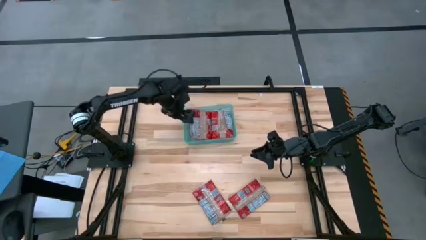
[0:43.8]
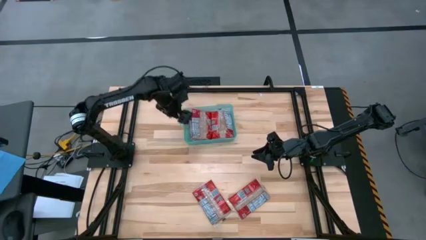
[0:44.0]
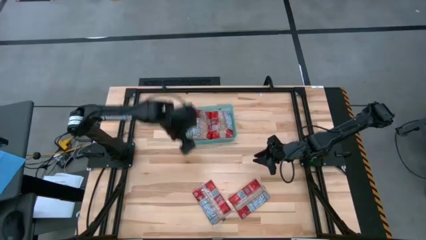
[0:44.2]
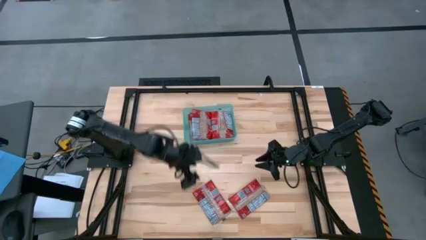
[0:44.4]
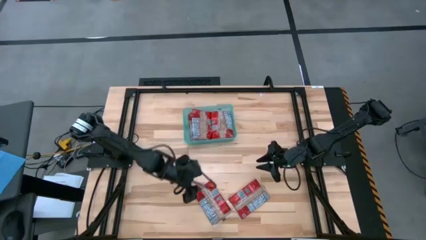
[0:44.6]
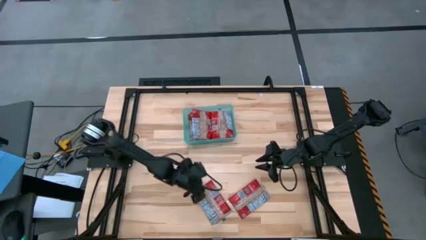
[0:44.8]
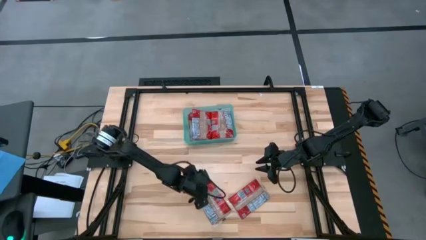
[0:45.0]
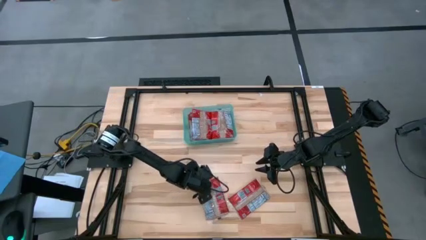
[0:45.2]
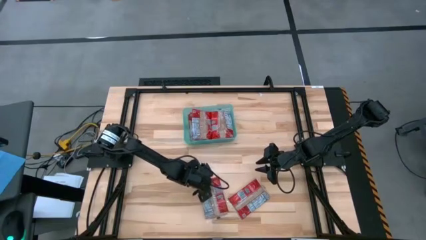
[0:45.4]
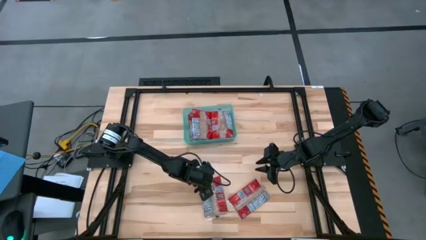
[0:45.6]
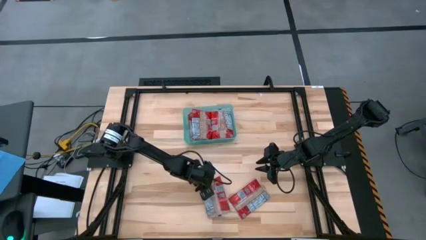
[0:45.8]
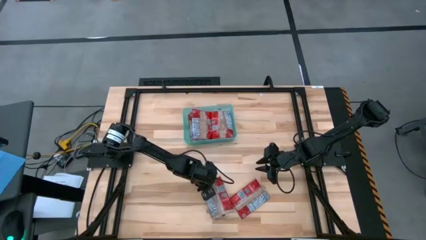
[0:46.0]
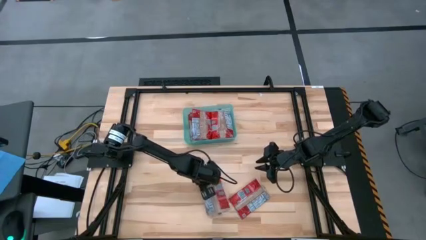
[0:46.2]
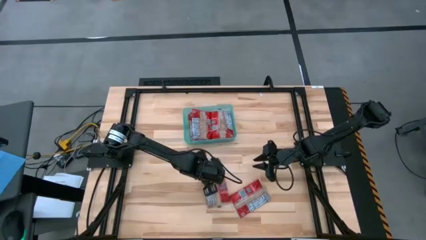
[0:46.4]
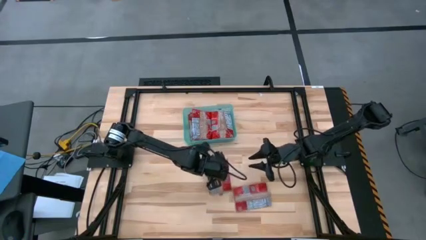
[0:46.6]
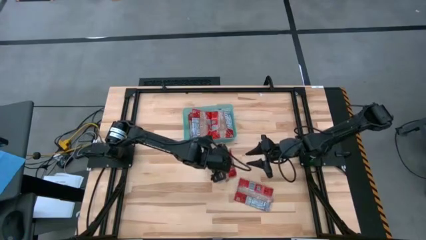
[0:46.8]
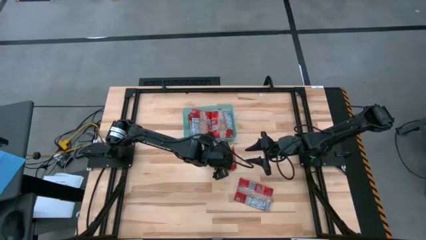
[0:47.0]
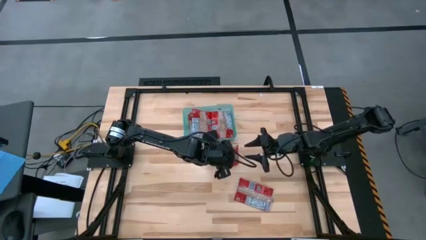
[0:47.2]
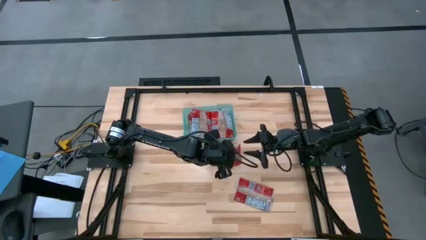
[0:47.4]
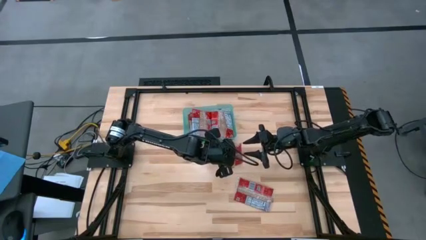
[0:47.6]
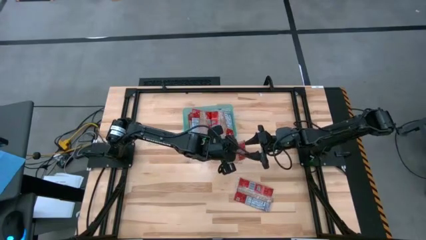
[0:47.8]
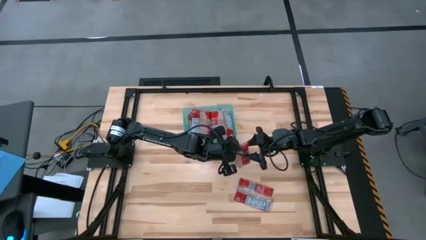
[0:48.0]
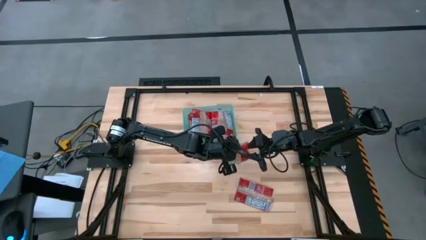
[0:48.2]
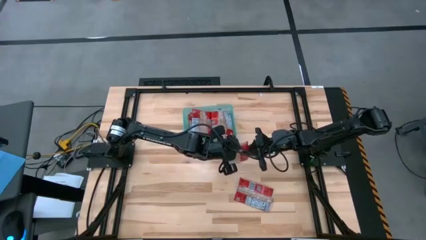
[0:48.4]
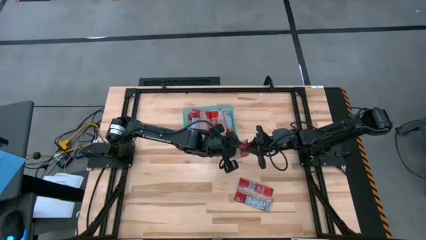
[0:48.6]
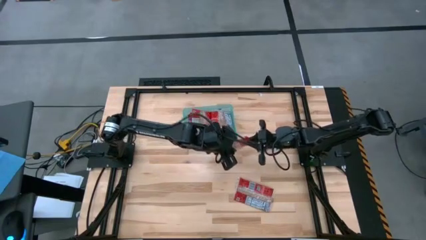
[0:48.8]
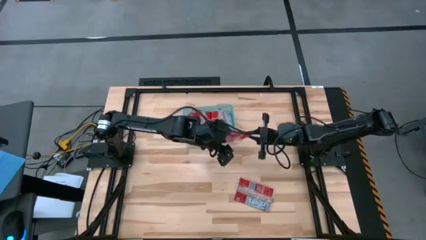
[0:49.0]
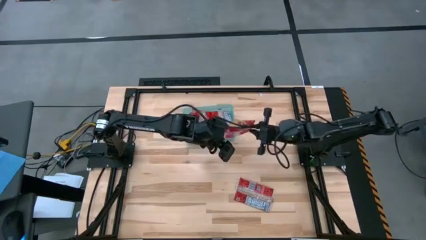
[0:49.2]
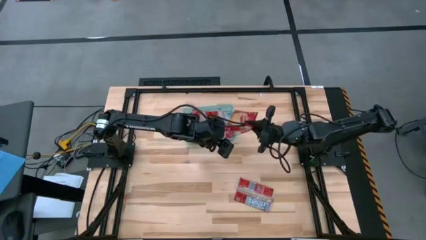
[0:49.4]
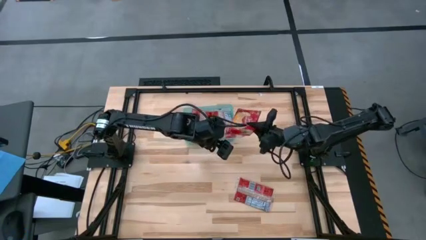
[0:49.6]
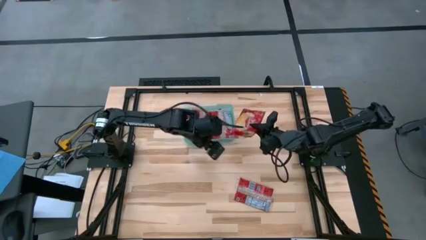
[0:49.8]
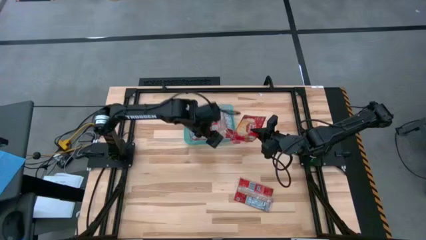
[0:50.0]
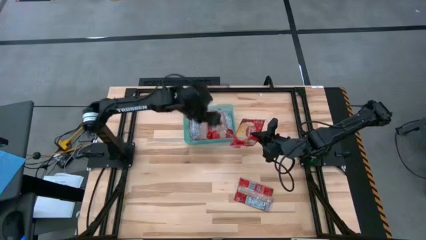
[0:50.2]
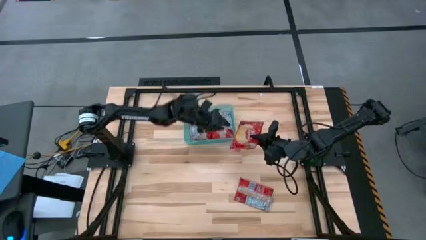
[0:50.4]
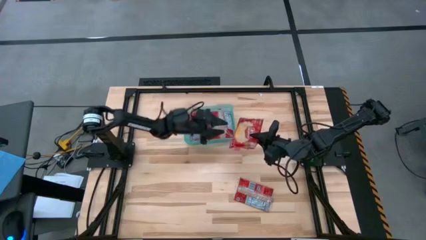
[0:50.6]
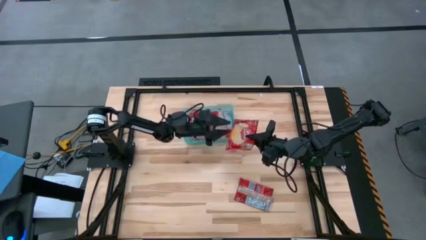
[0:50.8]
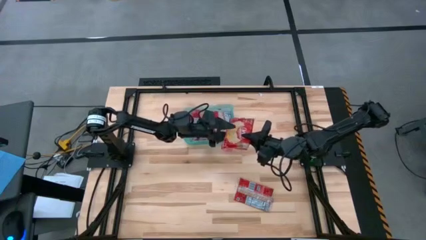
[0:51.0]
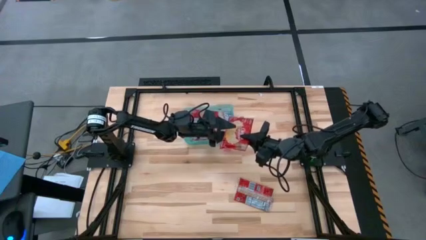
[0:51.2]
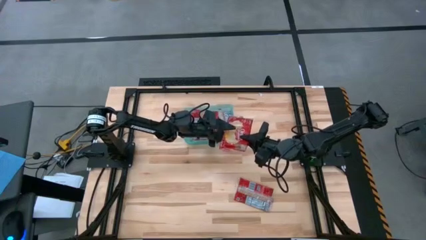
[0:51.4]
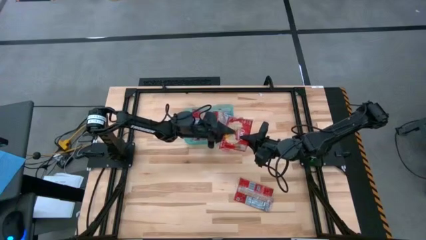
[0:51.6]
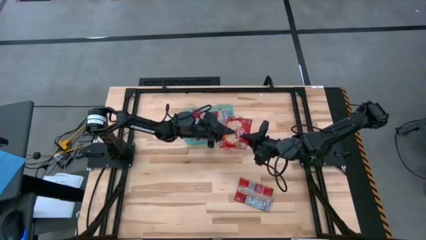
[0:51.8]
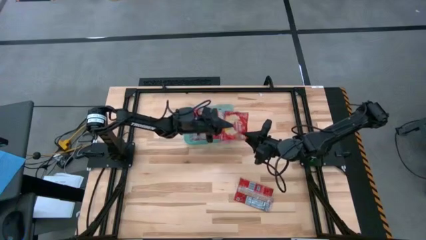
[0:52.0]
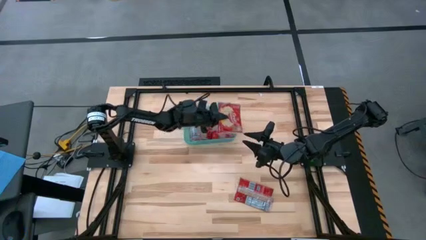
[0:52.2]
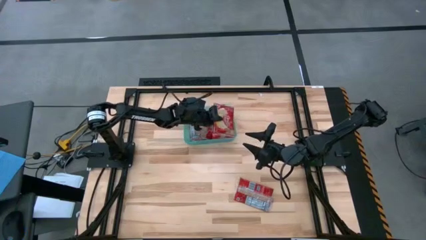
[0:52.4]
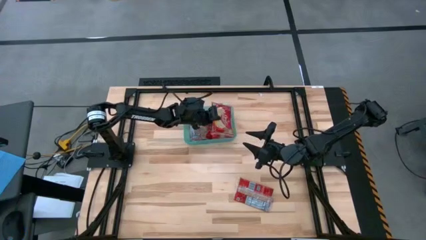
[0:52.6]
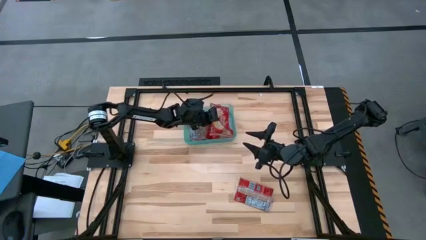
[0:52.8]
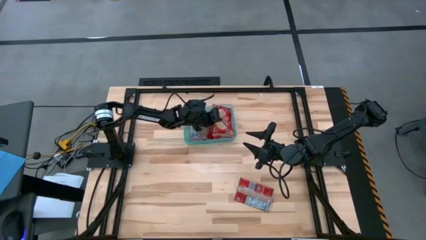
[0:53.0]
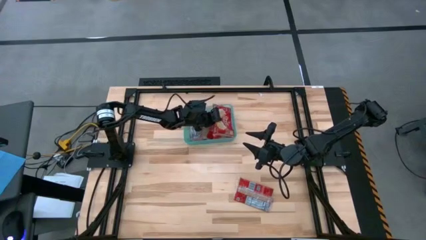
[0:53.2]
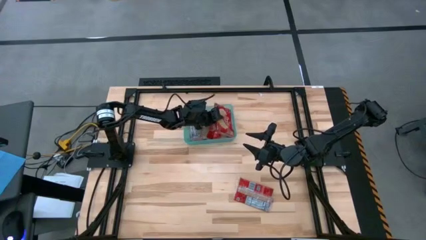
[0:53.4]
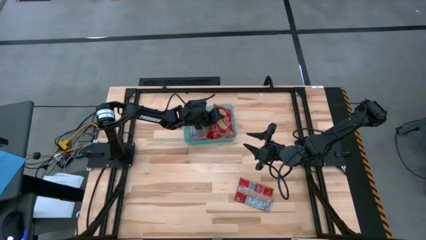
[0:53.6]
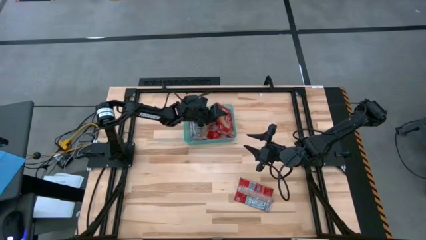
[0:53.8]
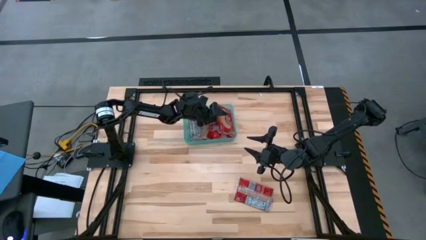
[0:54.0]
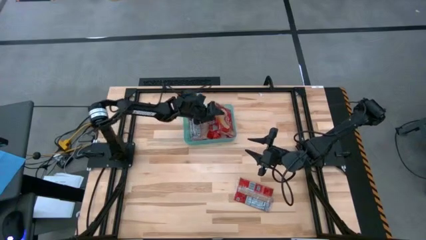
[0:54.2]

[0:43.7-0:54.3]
Task: Sort popcorn bags into baskets
Put the red popcorn bag into the blue bin

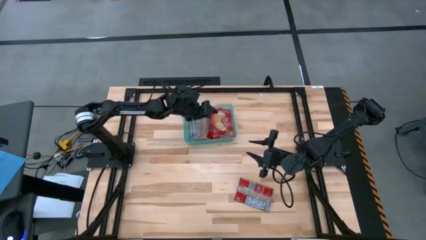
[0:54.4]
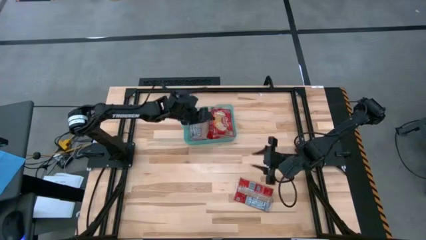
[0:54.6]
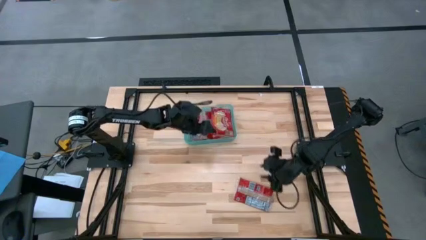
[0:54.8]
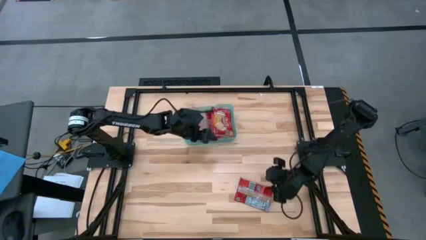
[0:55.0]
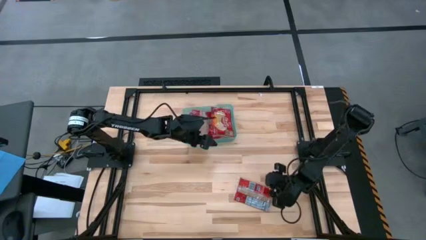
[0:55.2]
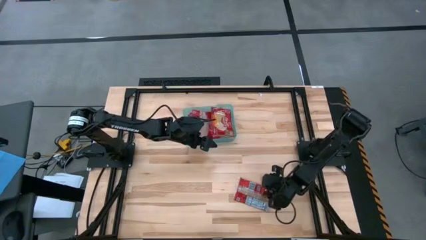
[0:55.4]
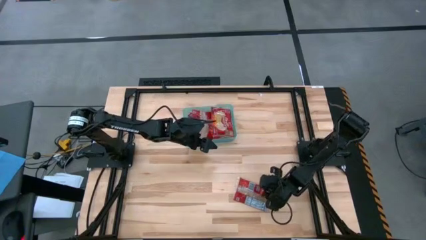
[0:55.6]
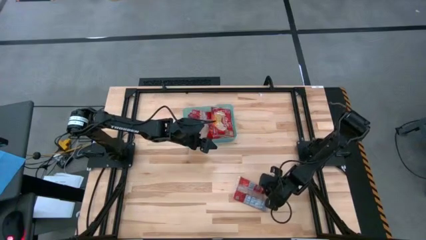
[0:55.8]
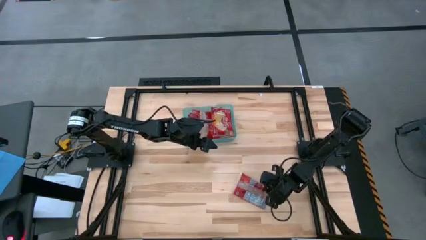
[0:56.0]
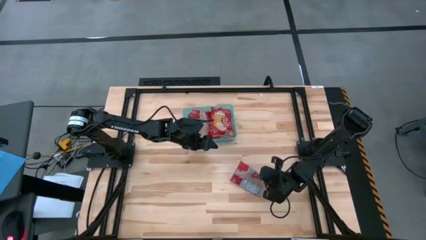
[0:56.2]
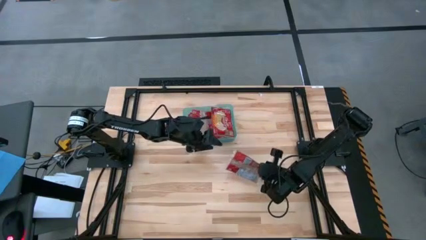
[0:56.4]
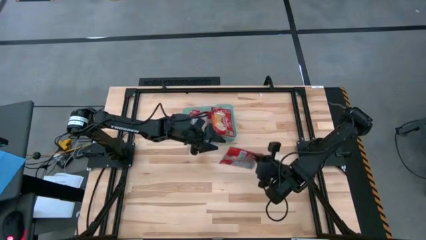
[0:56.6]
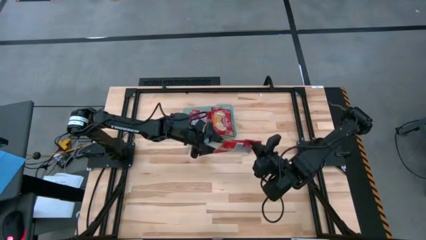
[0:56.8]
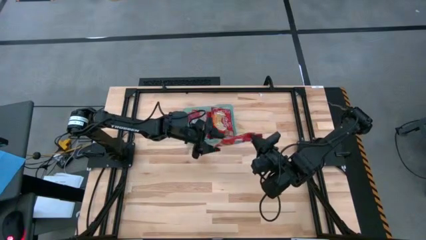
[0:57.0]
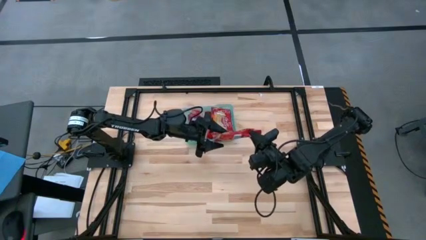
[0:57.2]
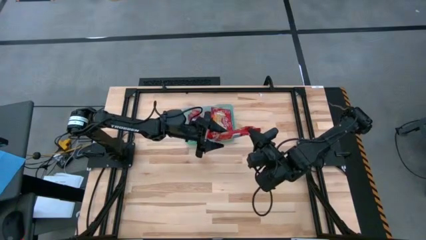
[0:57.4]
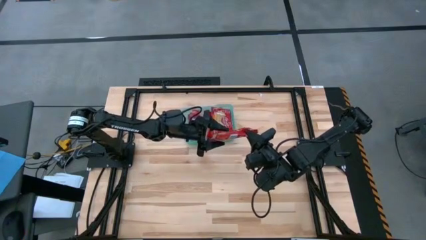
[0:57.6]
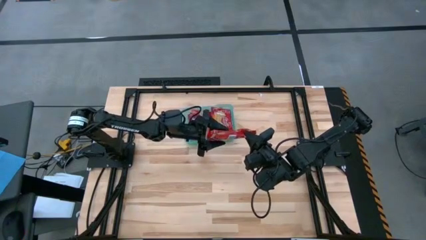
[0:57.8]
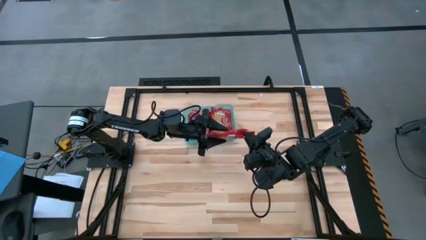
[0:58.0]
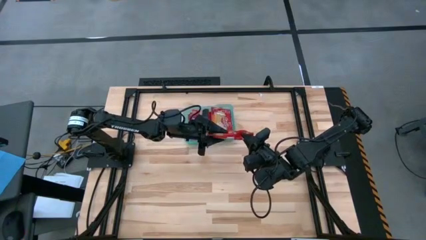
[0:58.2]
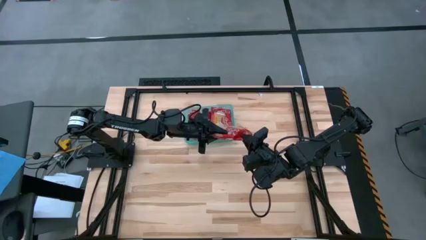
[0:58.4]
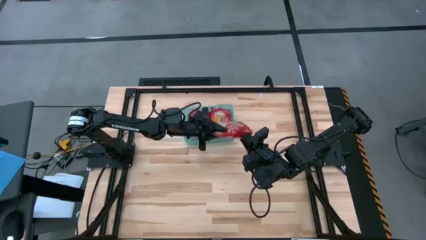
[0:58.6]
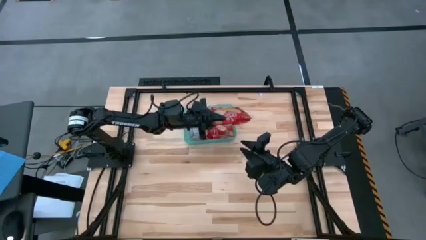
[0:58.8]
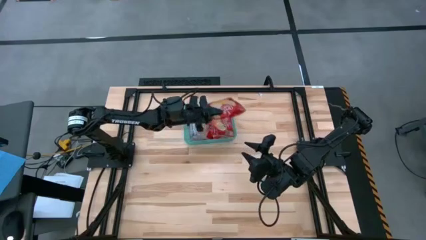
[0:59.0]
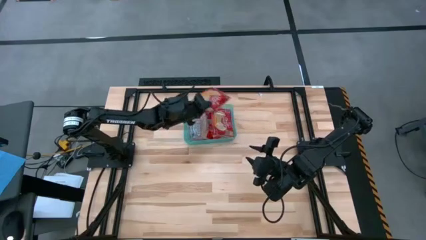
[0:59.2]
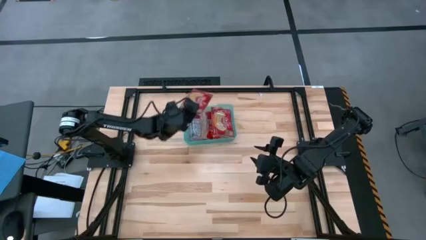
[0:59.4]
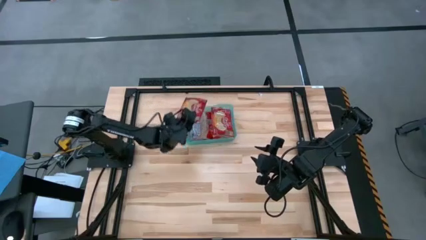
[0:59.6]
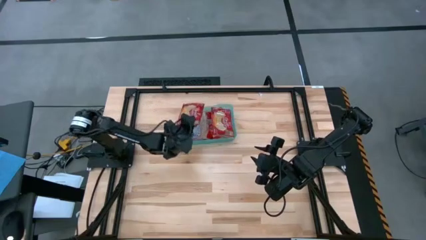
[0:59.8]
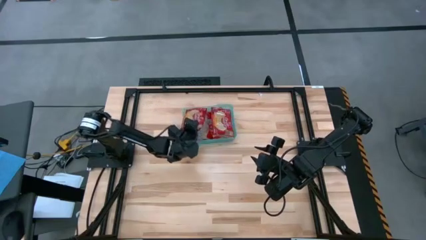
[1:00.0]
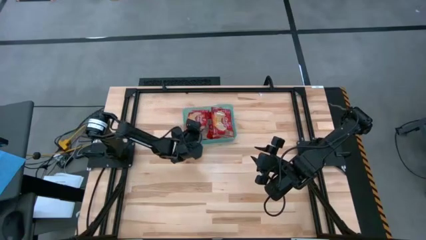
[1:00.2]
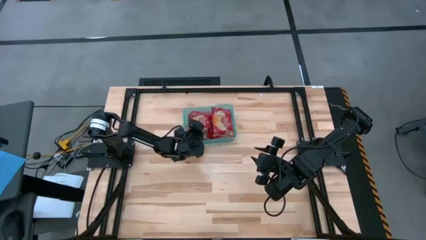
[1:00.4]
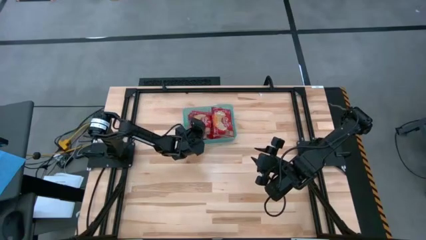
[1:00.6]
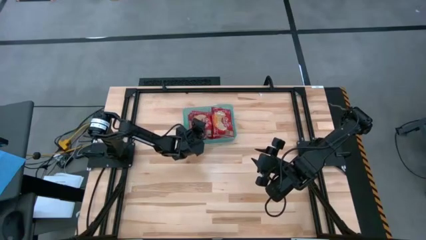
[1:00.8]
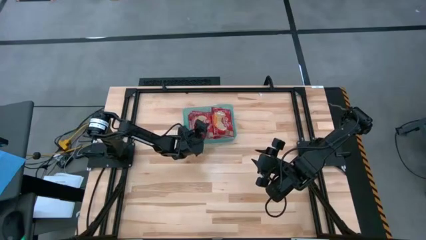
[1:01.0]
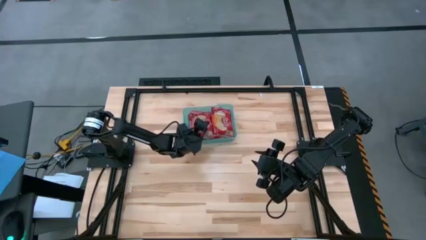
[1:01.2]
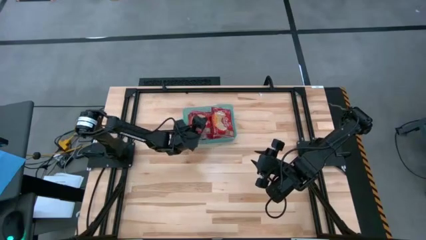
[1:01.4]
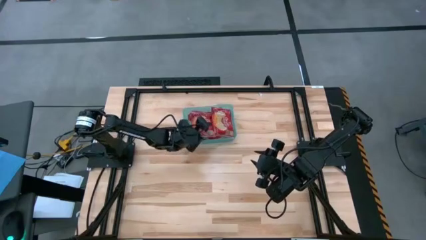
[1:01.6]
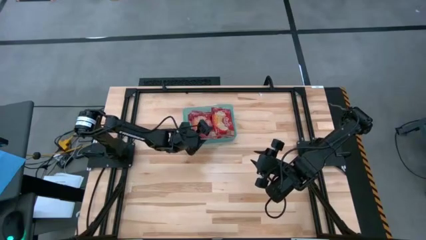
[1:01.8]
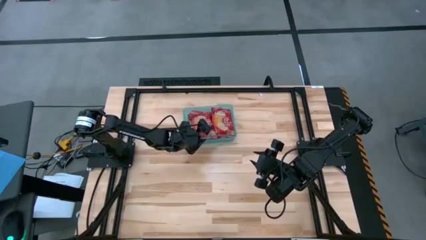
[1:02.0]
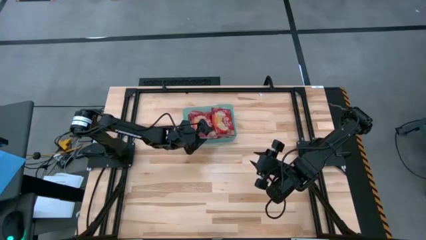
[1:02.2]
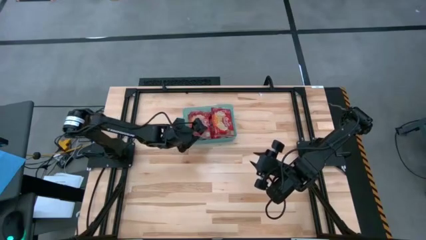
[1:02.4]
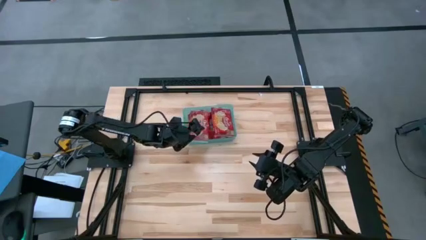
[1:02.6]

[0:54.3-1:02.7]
Put the red popcorn bag into the blue bin
